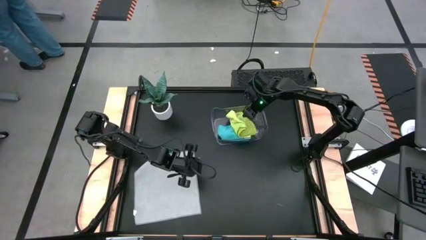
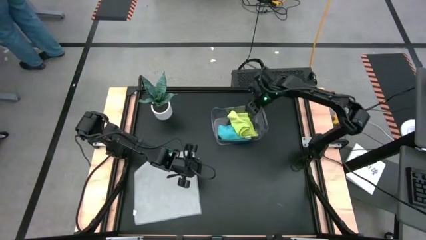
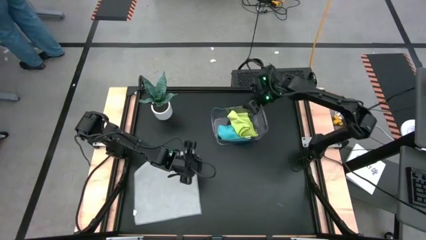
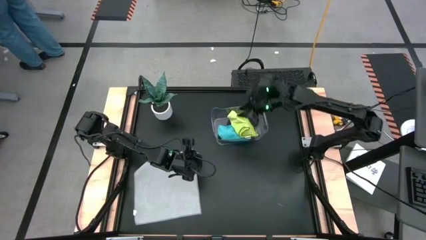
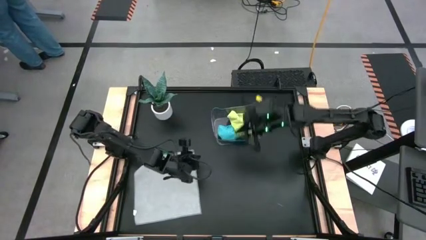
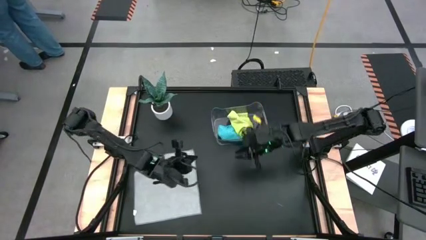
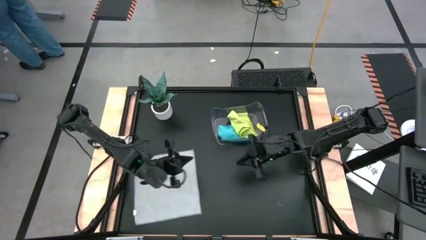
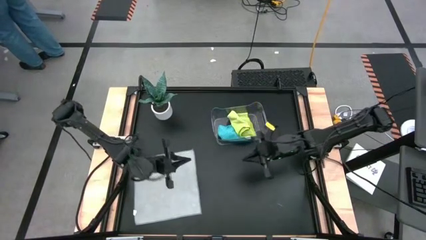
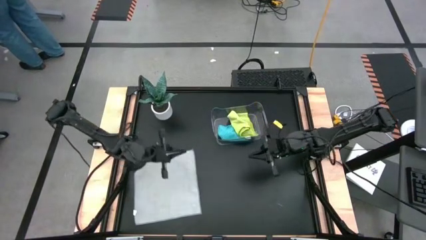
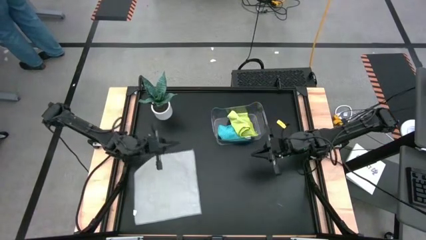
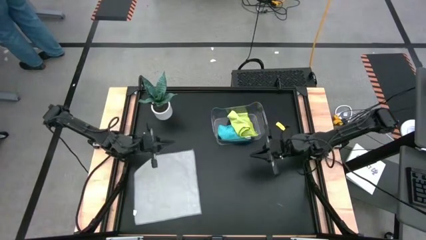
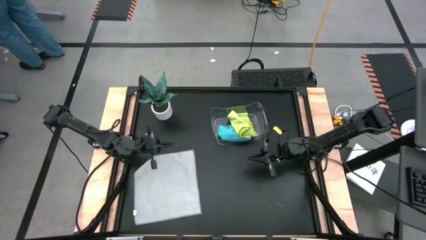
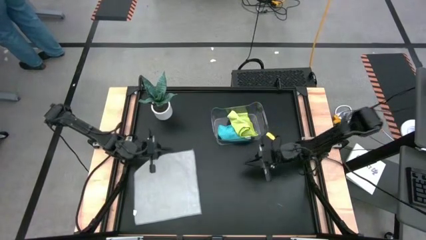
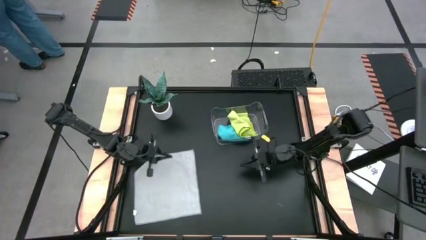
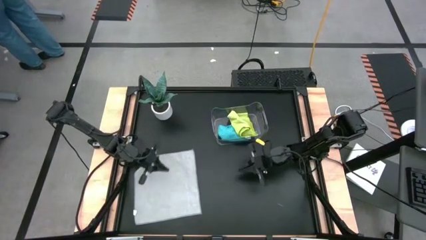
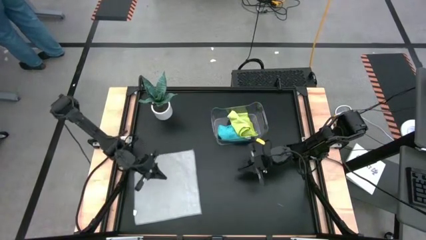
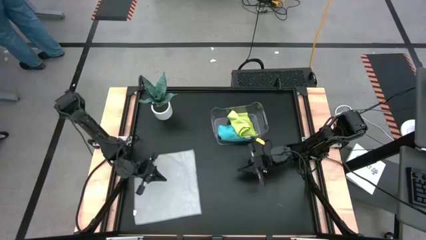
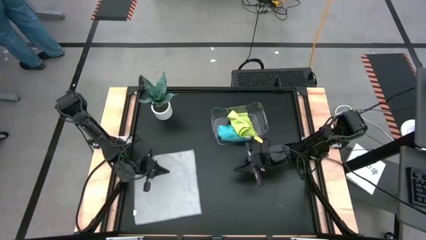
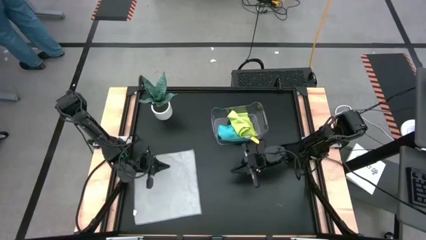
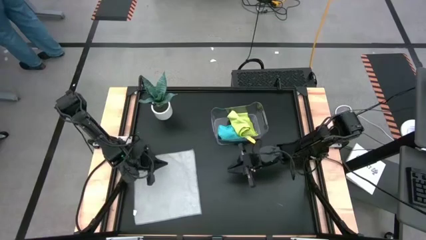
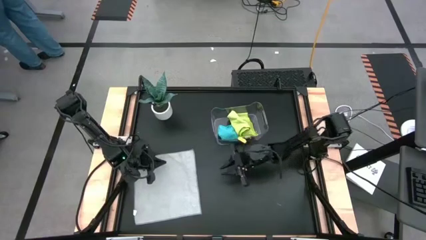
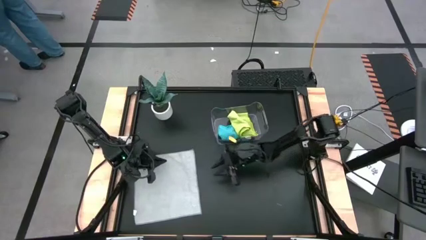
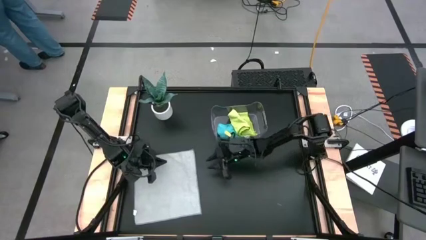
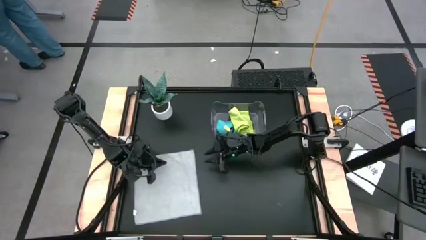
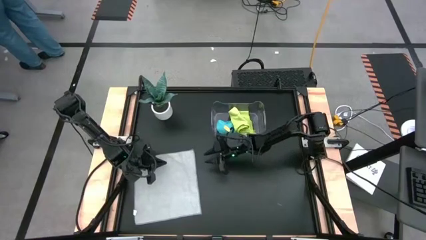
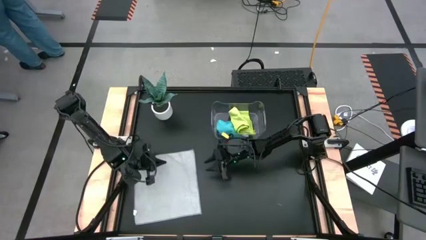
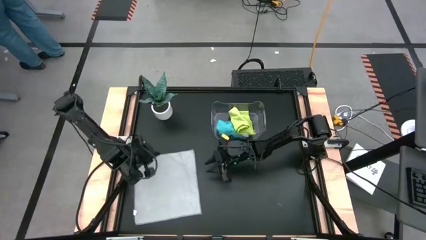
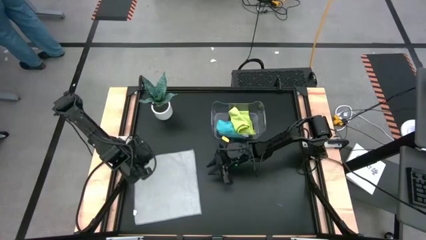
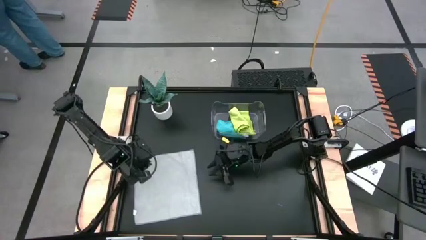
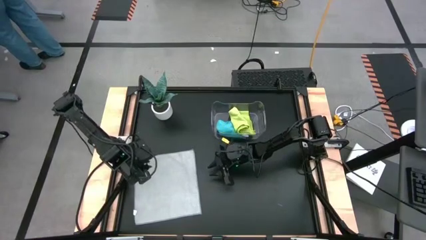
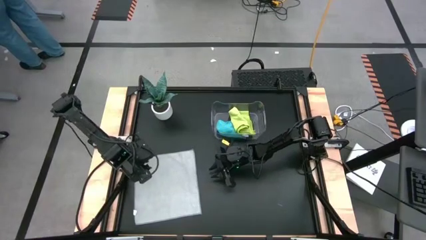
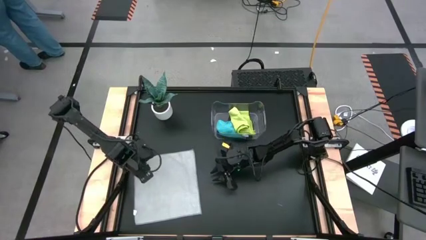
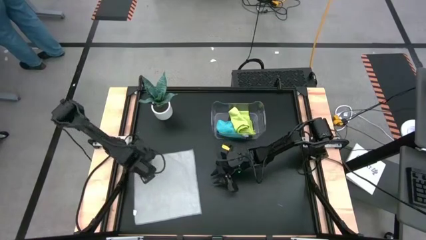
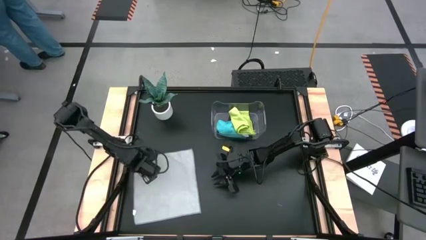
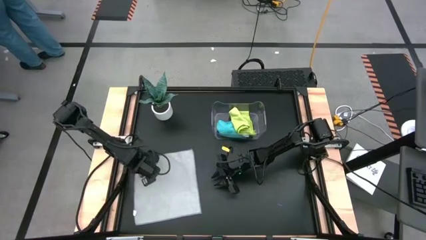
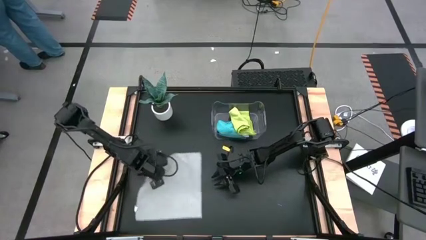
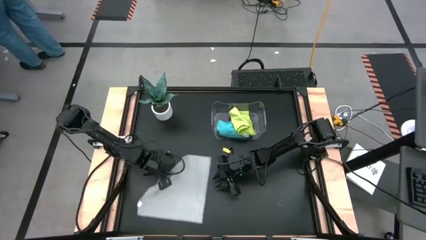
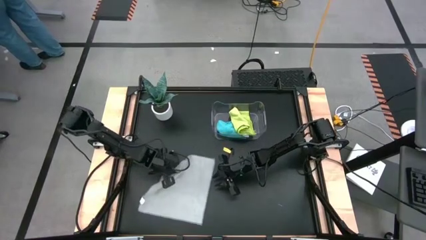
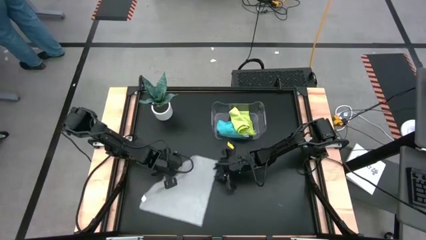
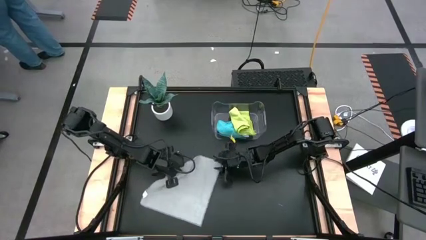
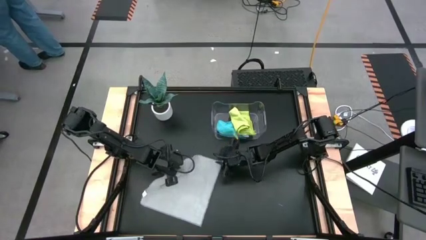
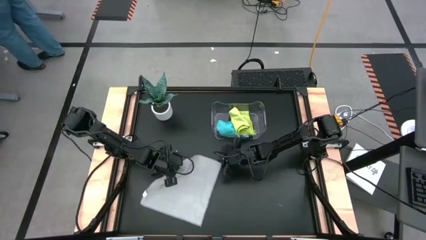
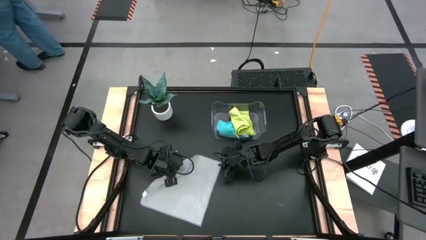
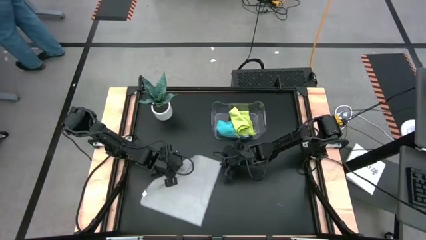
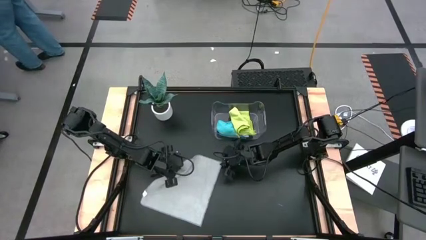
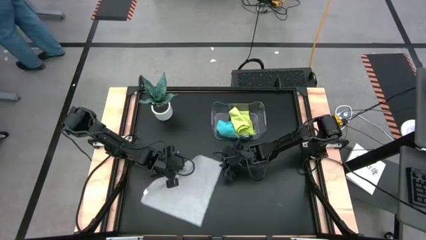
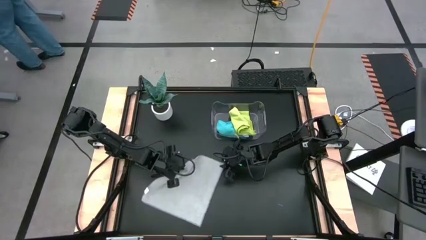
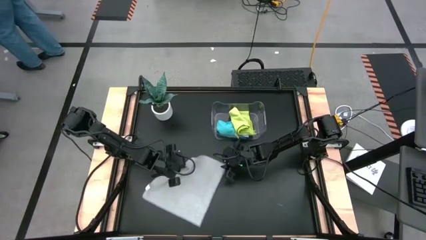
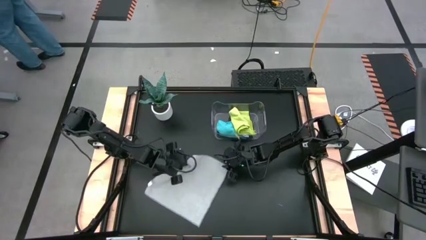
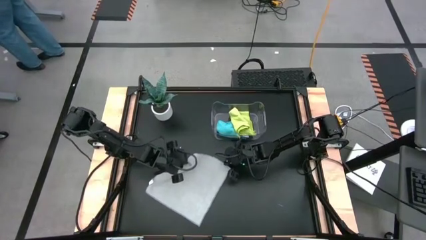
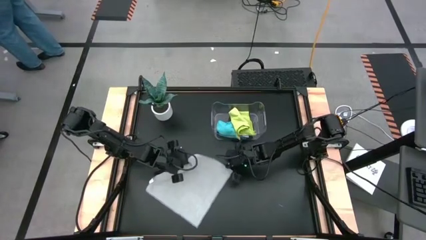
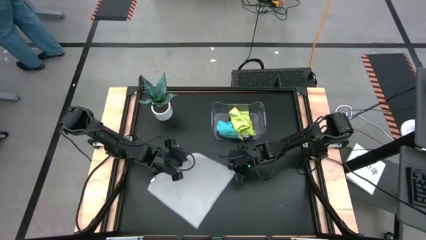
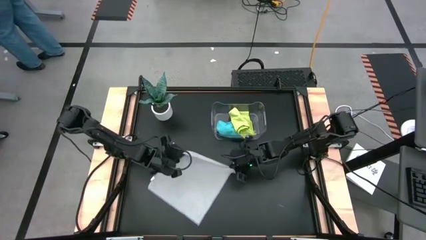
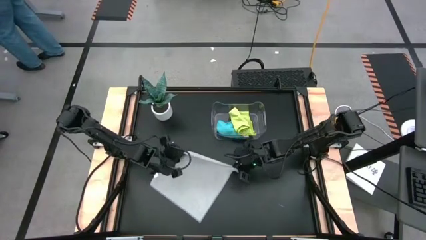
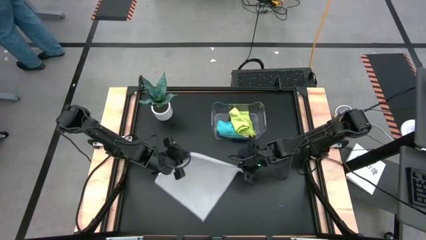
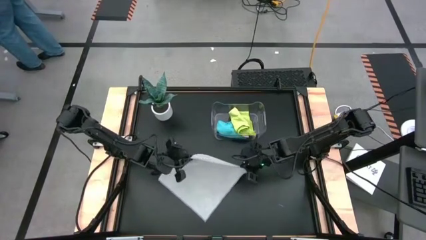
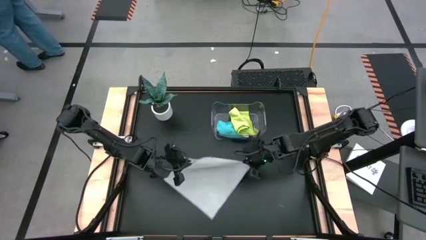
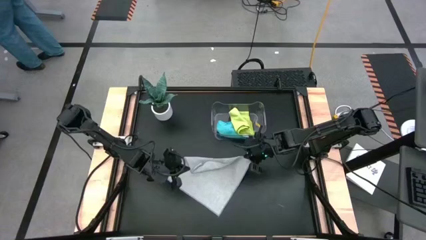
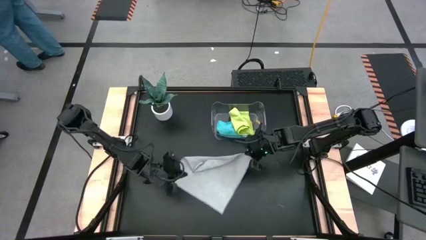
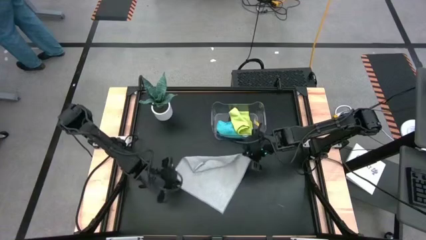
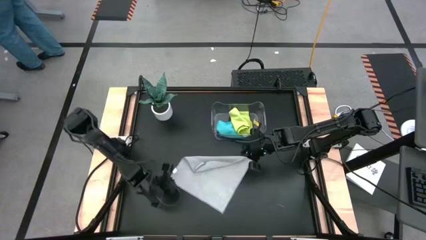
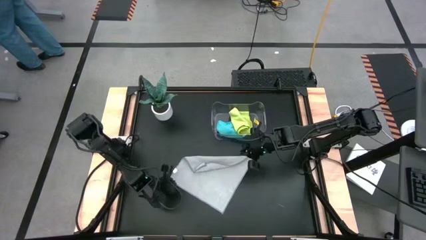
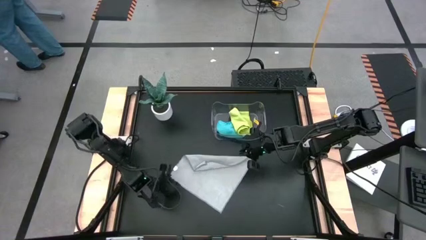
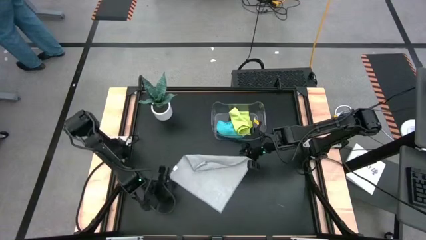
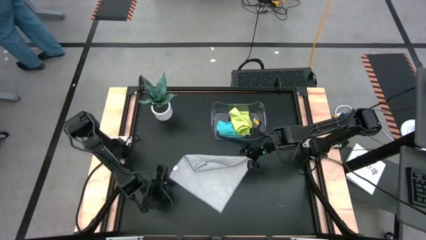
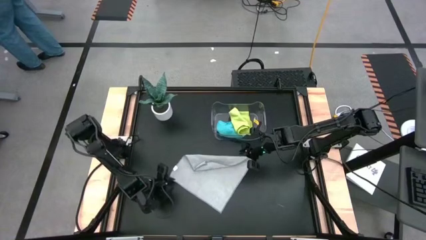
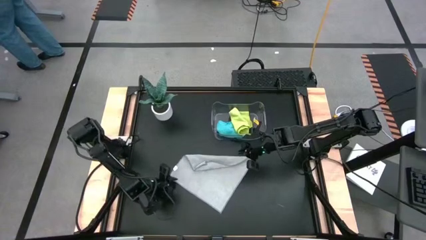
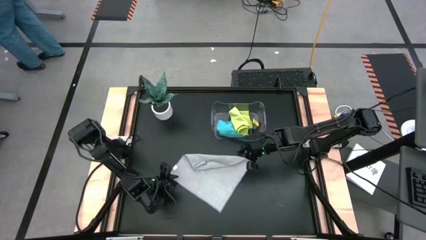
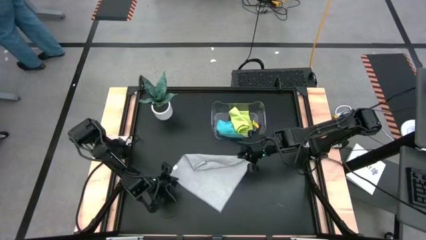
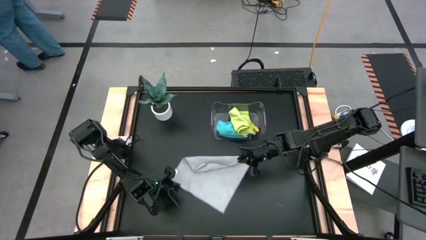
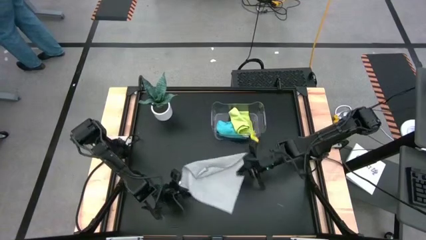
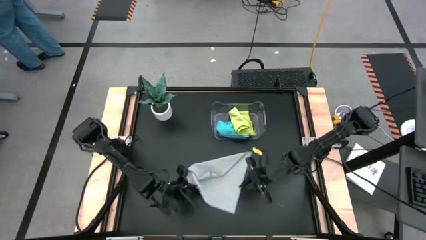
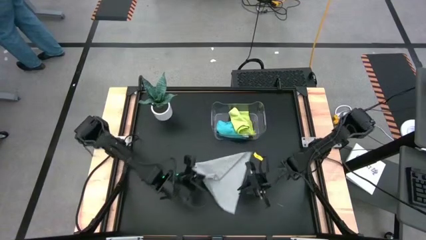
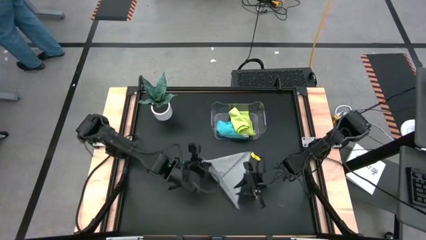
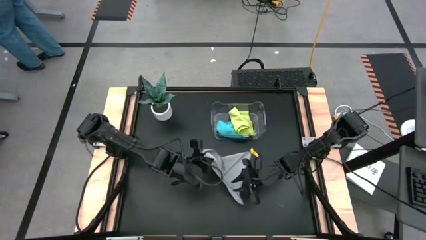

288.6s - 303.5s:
Task: Fold microfiber towels
Fold the gray towel
